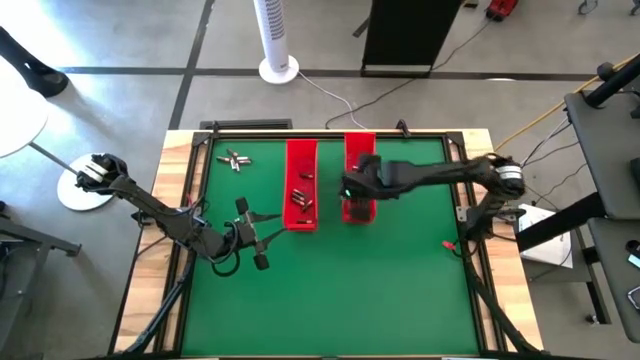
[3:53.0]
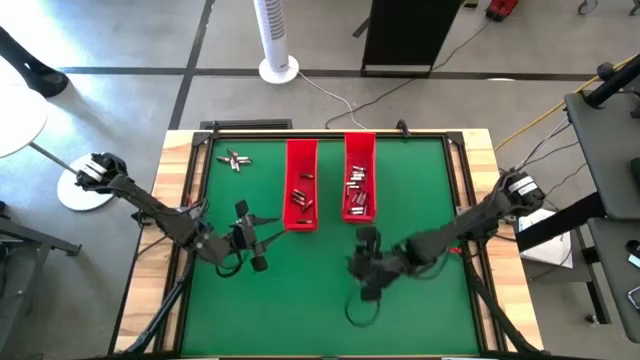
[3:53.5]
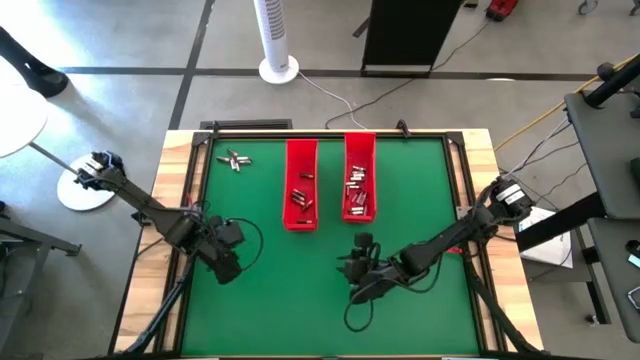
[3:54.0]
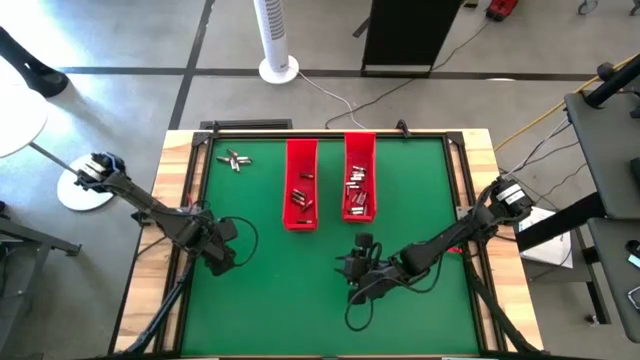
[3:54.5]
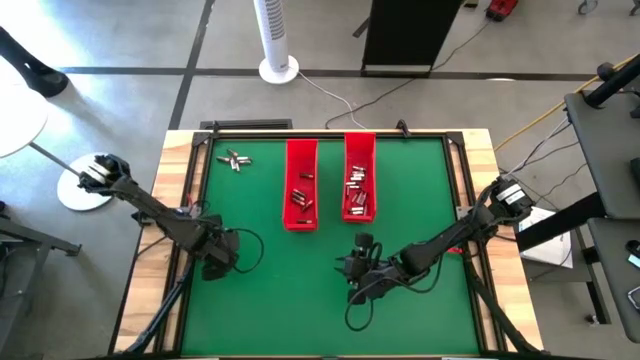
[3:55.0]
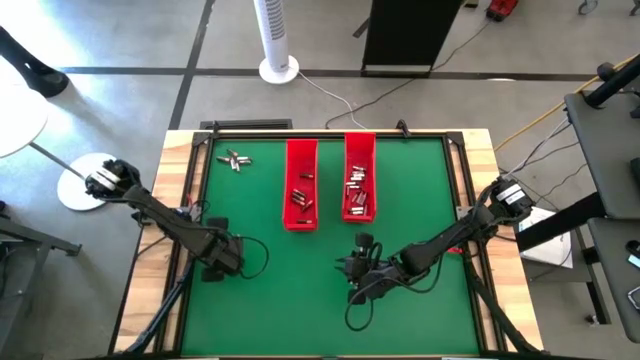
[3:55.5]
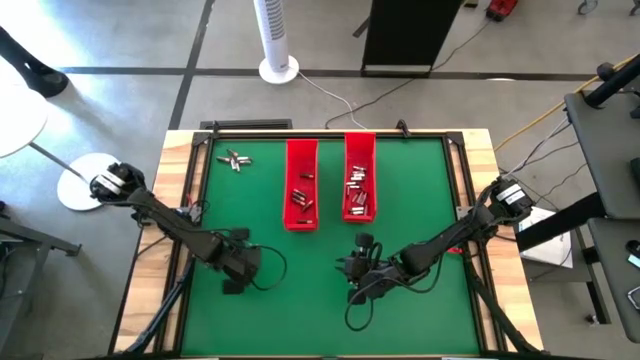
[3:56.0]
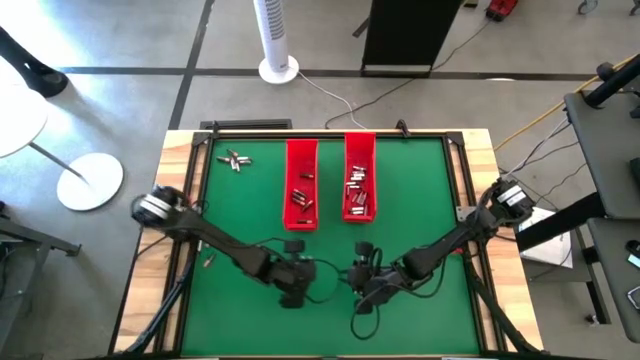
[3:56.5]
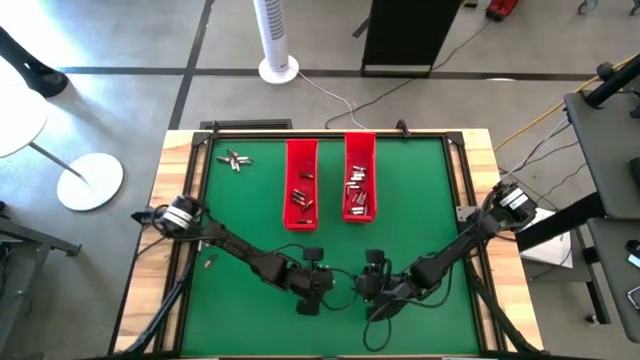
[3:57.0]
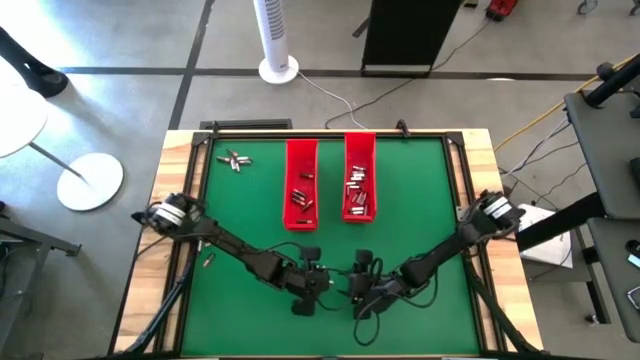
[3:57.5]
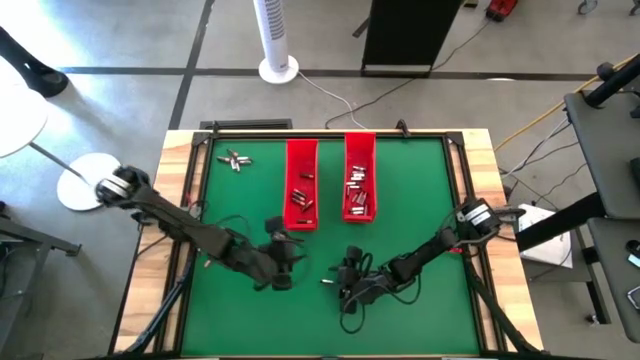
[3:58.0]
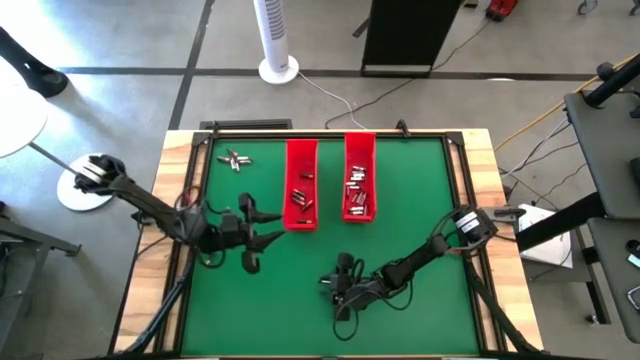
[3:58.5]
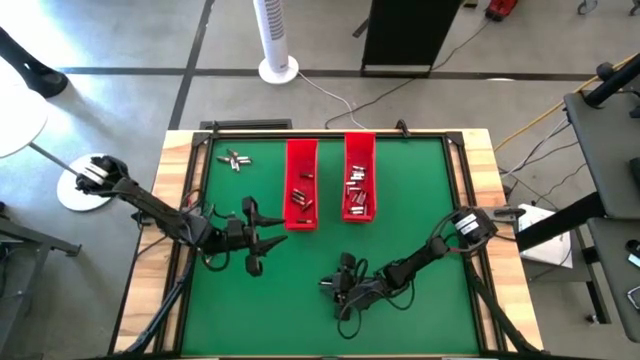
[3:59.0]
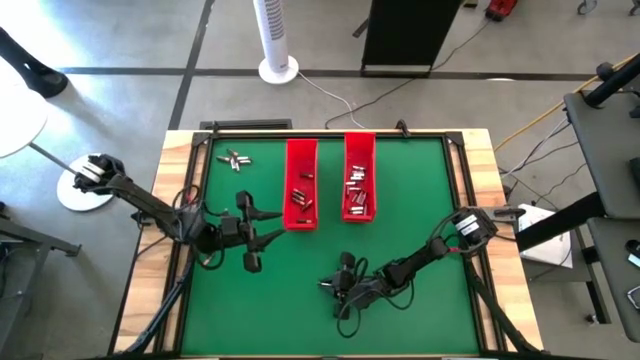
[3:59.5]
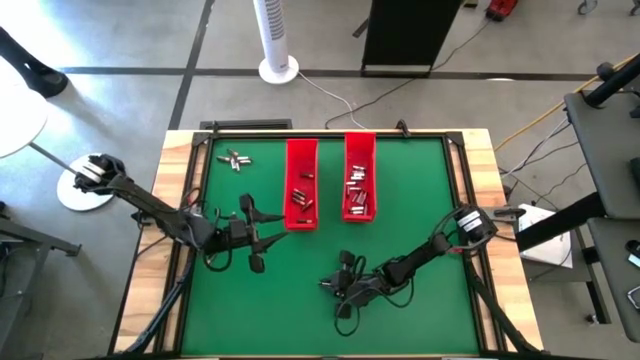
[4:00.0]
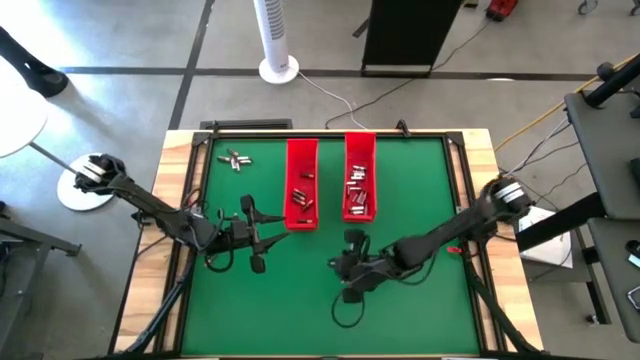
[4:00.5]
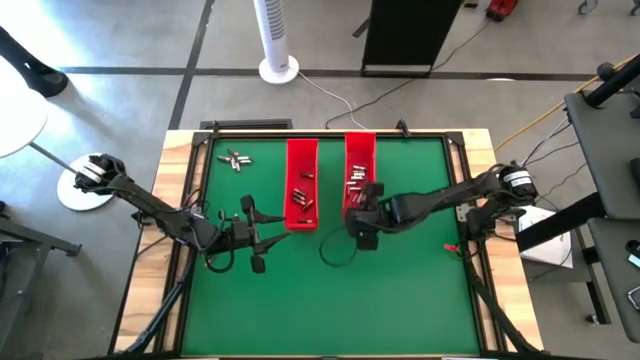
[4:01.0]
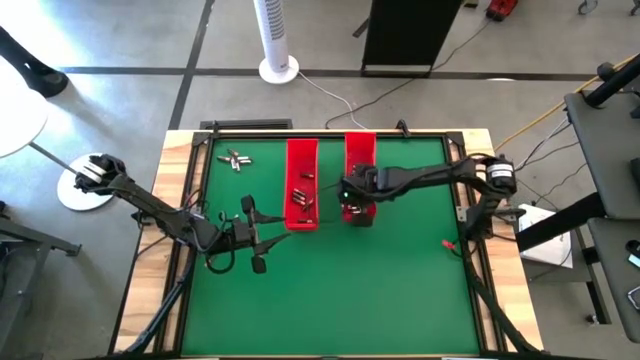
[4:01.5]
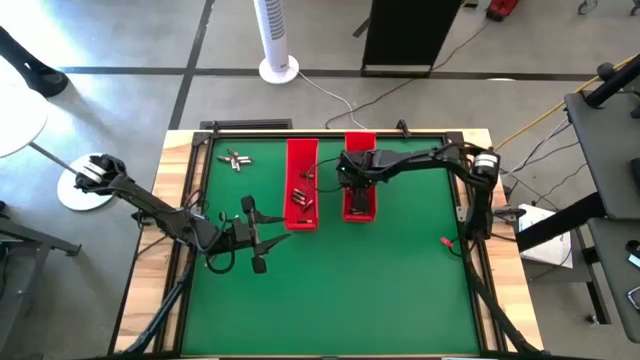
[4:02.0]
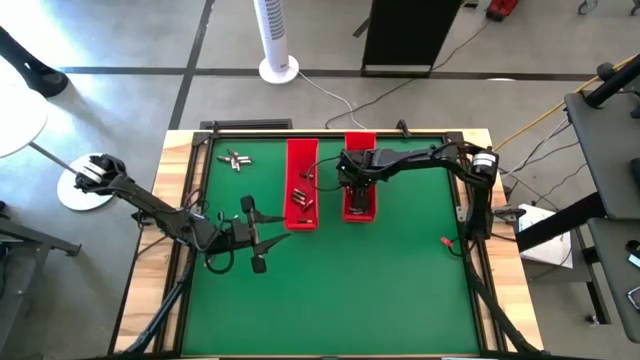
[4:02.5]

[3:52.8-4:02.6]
Task: Sort batteries
Put the silver battery into the right red bin

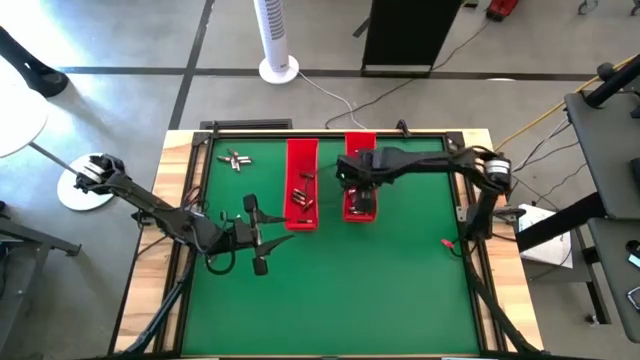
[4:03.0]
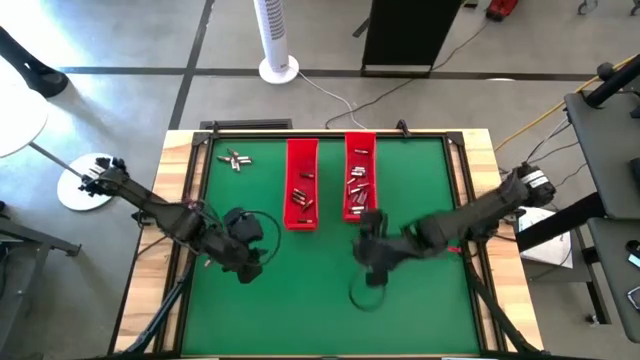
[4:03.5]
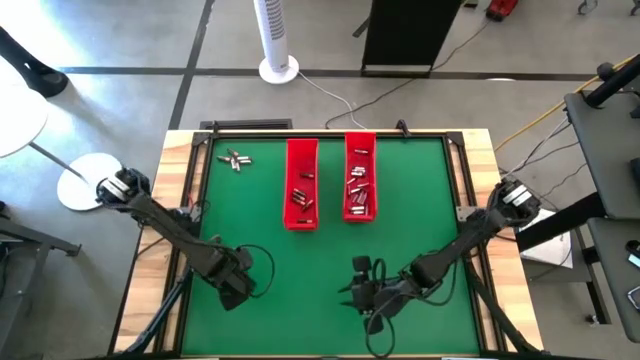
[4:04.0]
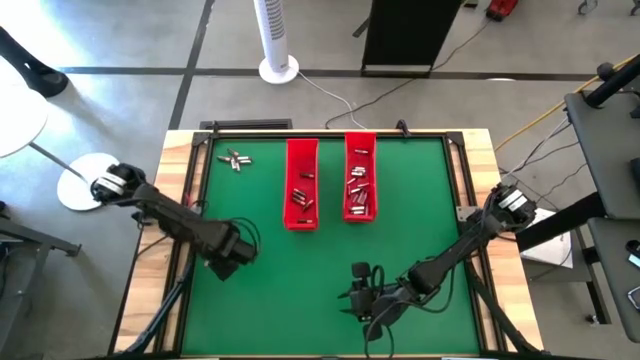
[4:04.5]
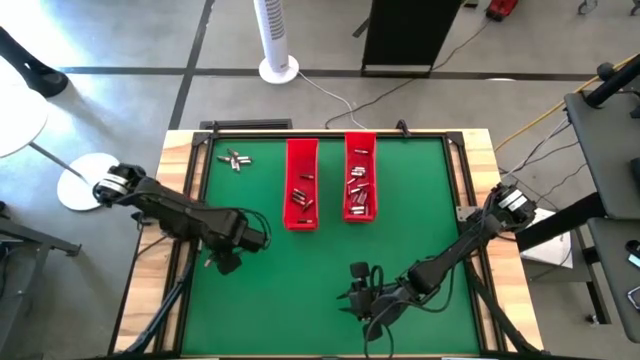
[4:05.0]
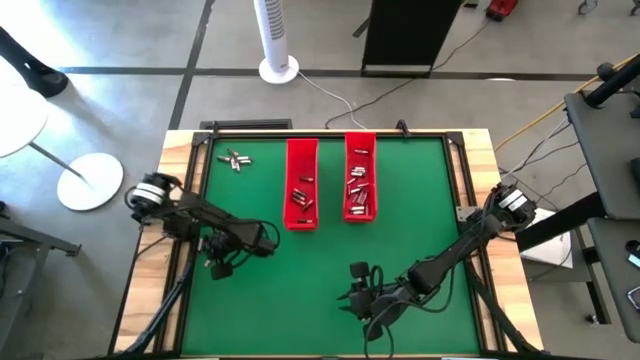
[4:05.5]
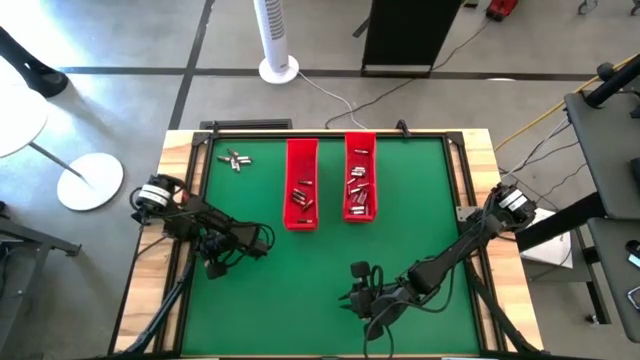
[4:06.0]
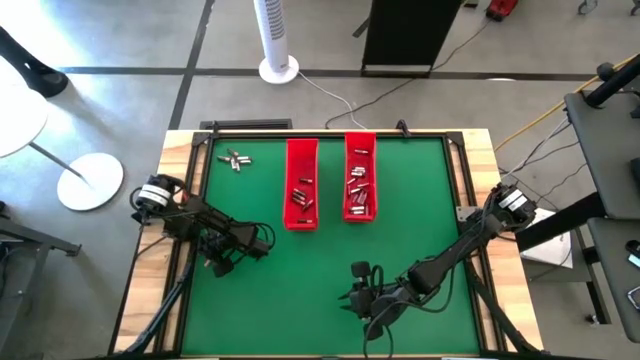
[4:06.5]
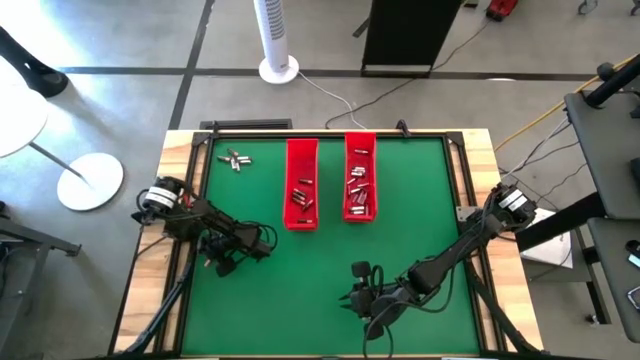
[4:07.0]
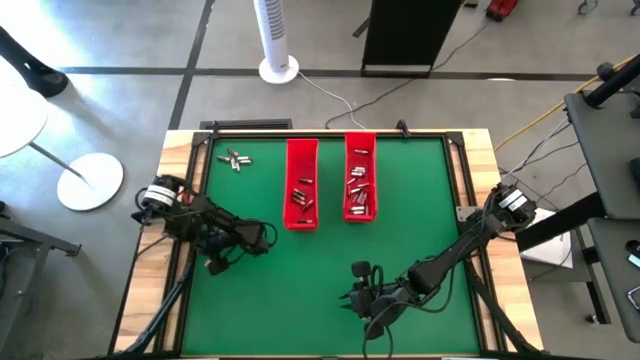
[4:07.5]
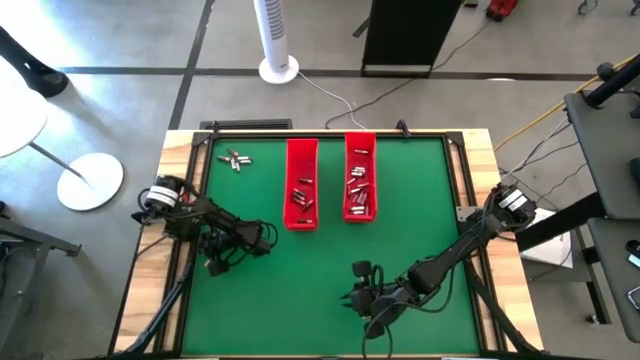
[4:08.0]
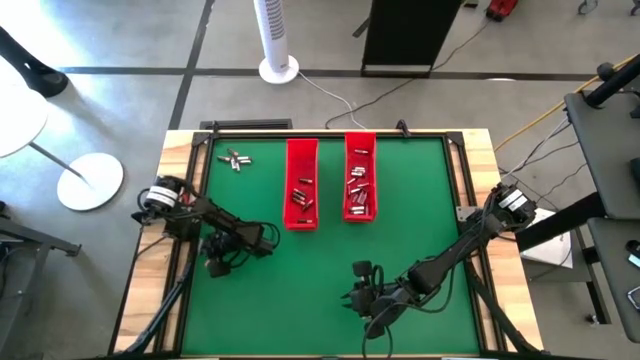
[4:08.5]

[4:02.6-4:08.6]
Adjust the silver battery

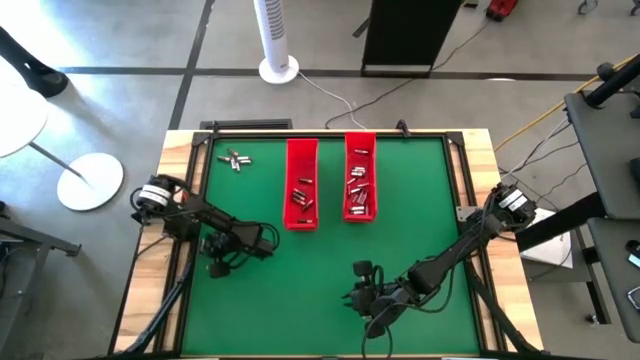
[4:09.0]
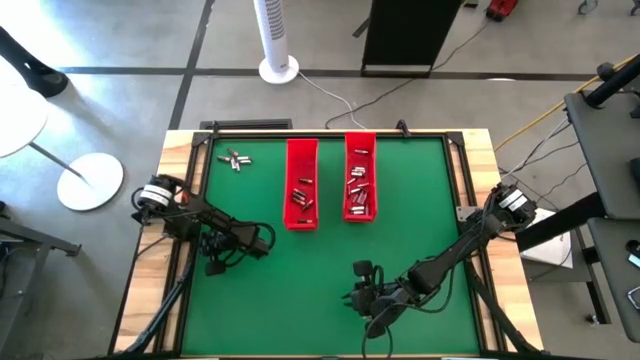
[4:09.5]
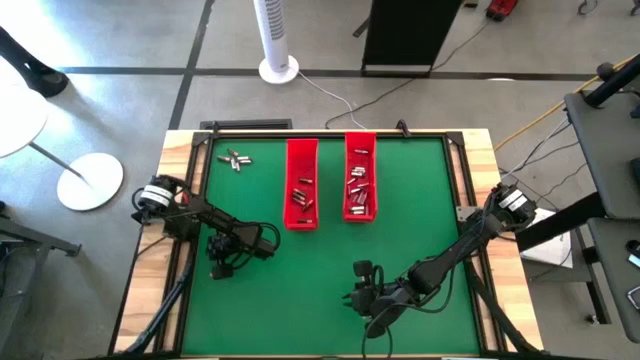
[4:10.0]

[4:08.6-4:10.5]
Adjust the silver battery

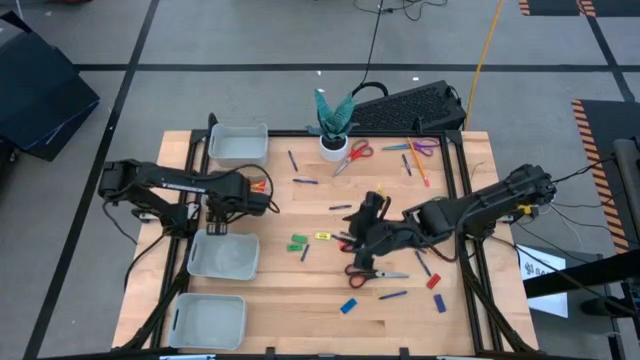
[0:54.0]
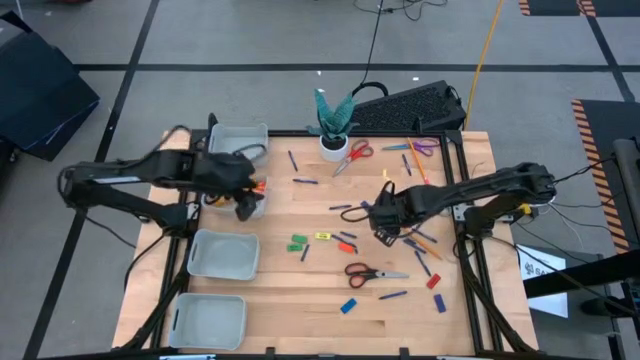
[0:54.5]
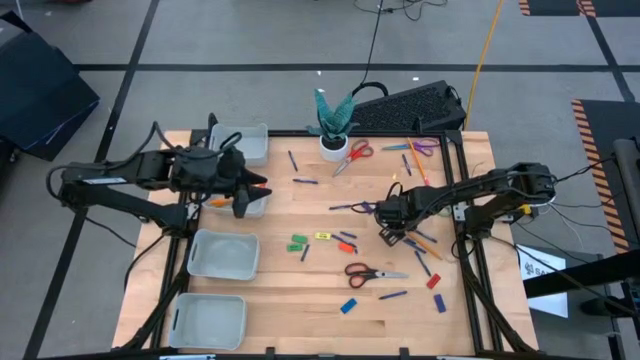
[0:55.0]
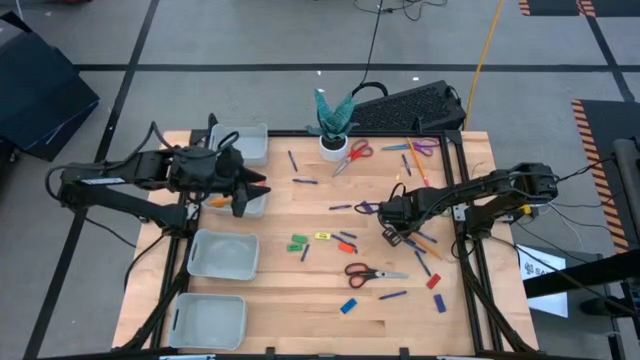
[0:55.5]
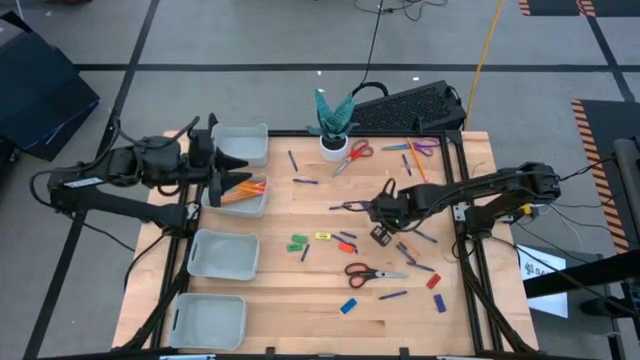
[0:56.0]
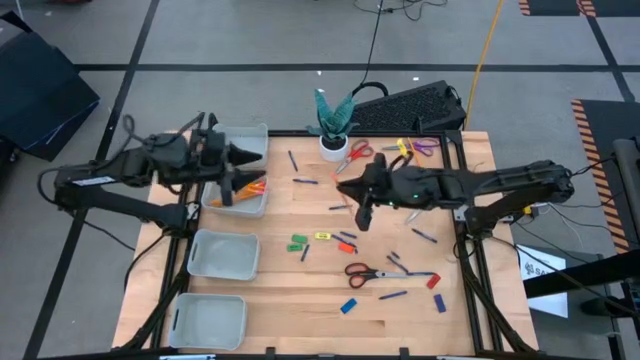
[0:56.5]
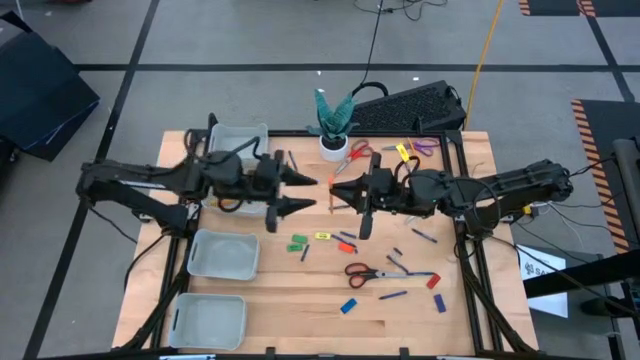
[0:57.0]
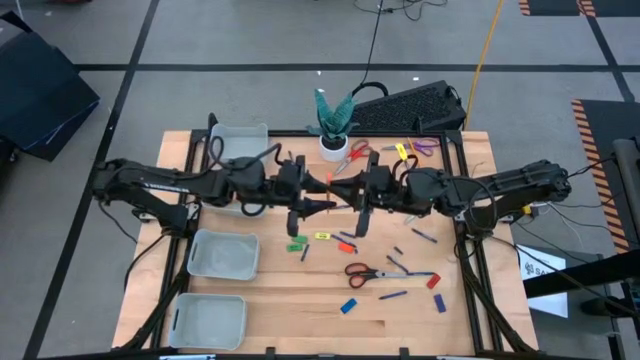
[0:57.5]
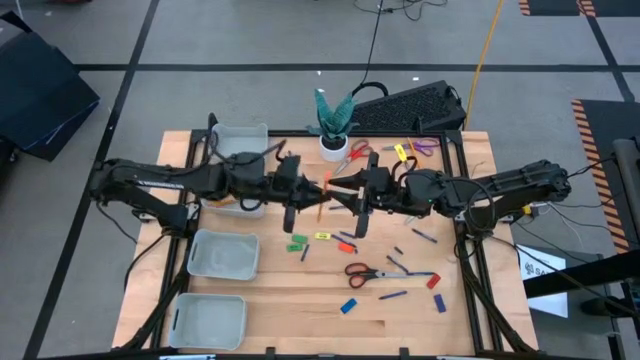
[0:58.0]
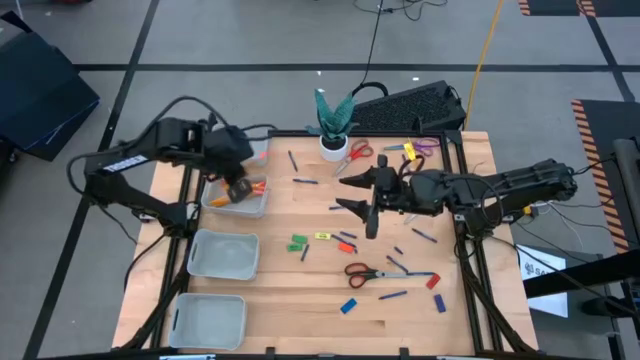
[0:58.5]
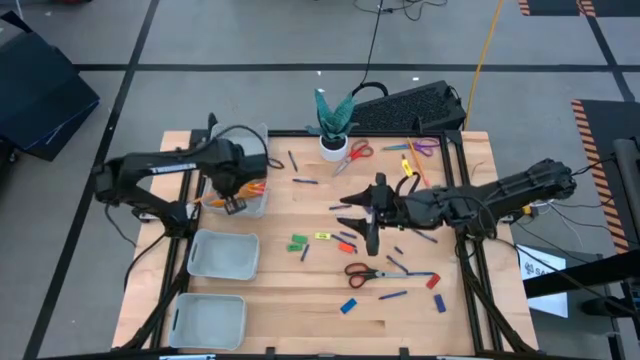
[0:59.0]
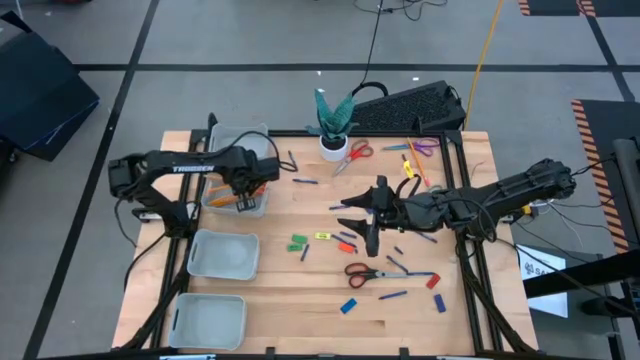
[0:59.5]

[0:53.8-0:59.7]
Task: Sort crayons/erasers/pens/pencils in bins
Put the orange pencil into the middle top gray bin
